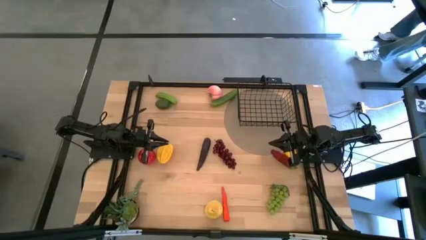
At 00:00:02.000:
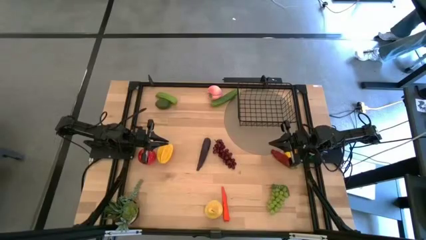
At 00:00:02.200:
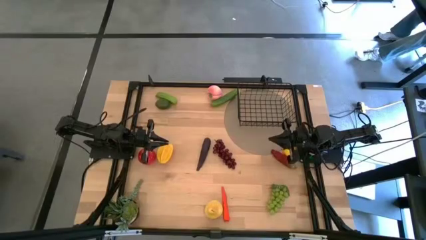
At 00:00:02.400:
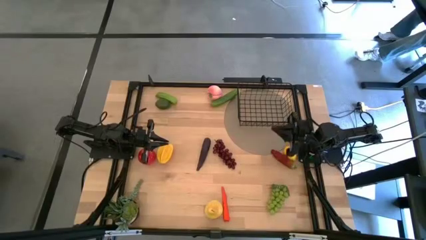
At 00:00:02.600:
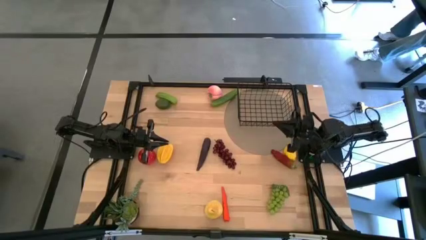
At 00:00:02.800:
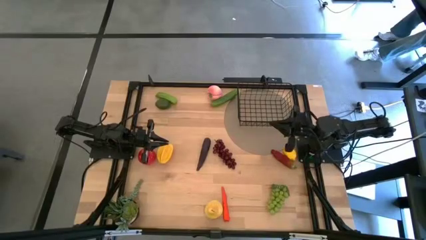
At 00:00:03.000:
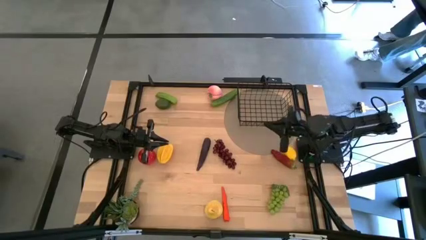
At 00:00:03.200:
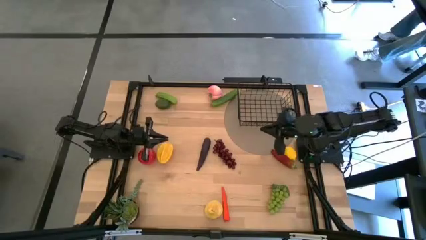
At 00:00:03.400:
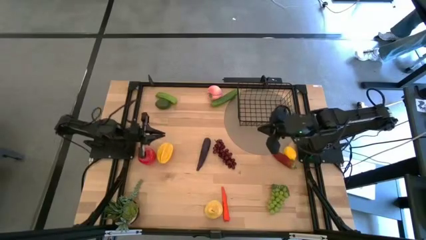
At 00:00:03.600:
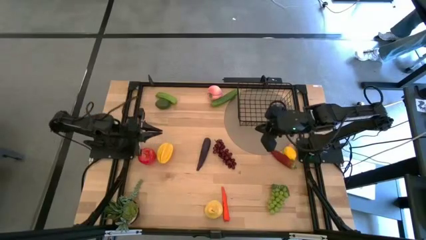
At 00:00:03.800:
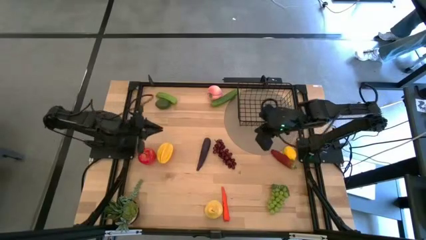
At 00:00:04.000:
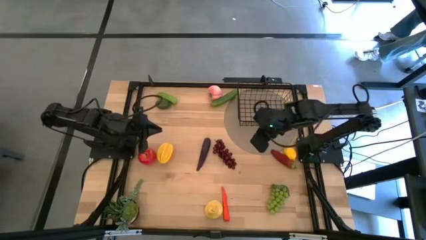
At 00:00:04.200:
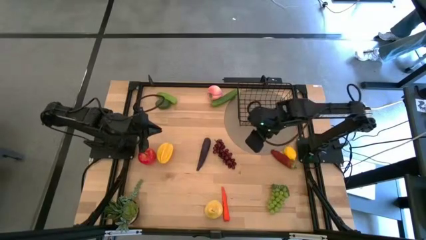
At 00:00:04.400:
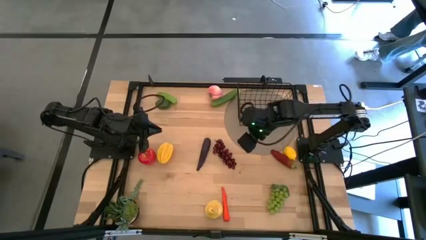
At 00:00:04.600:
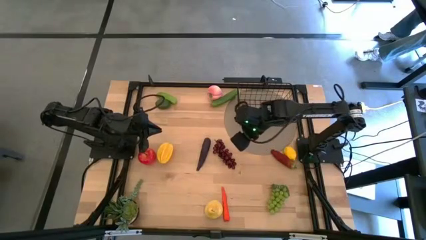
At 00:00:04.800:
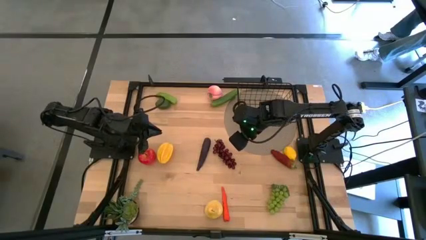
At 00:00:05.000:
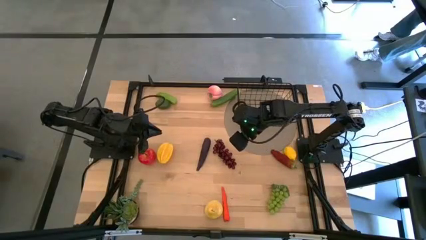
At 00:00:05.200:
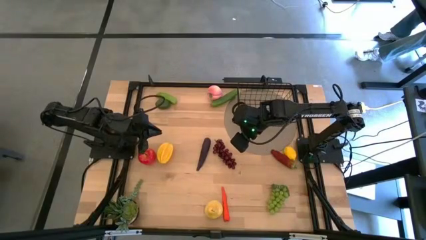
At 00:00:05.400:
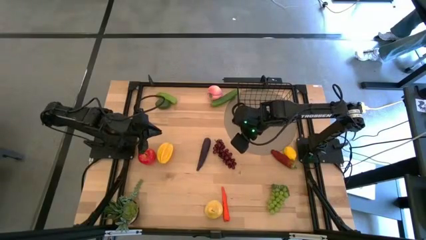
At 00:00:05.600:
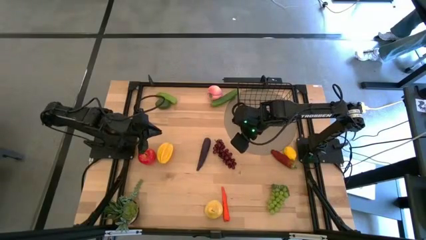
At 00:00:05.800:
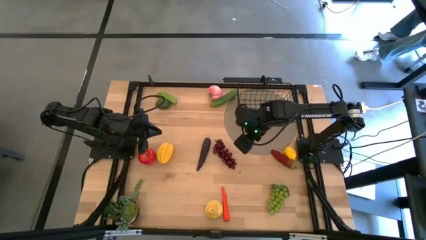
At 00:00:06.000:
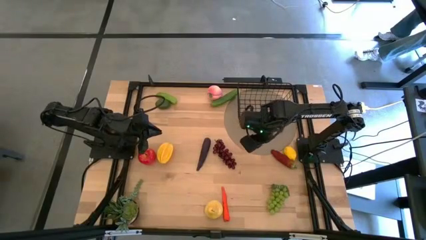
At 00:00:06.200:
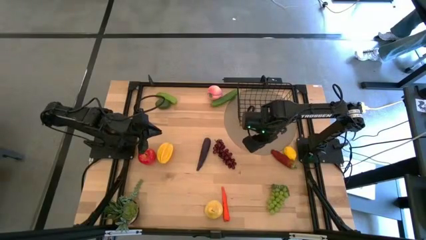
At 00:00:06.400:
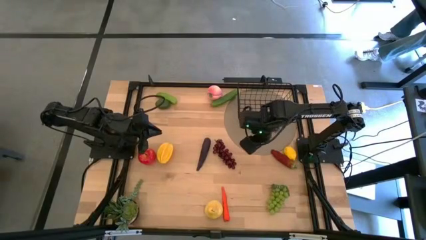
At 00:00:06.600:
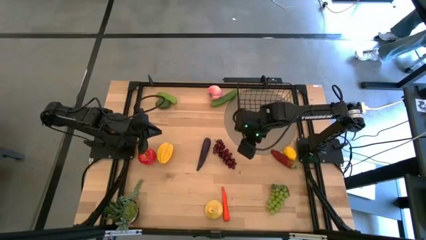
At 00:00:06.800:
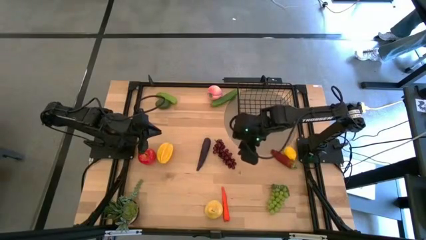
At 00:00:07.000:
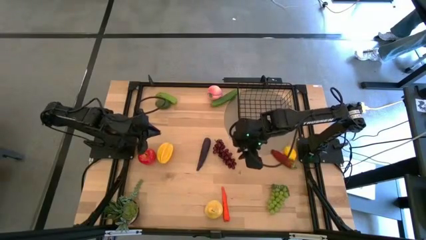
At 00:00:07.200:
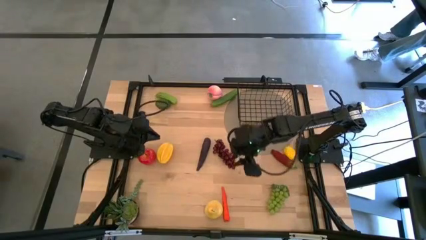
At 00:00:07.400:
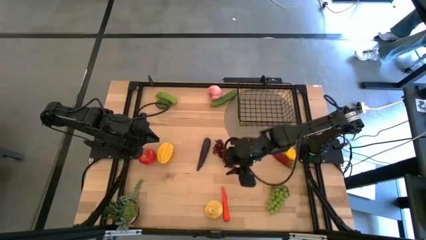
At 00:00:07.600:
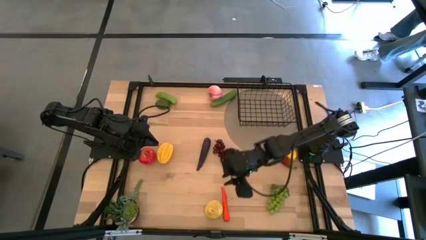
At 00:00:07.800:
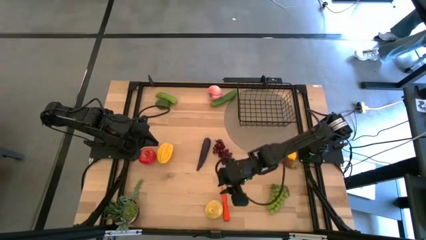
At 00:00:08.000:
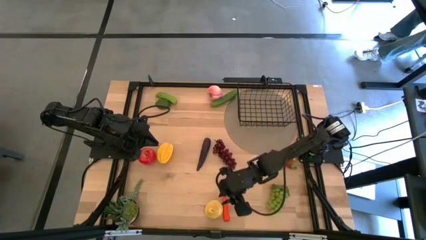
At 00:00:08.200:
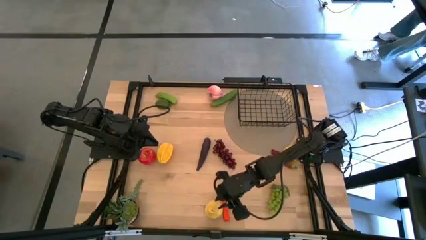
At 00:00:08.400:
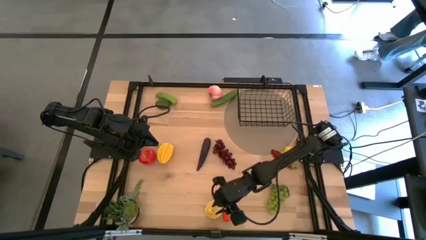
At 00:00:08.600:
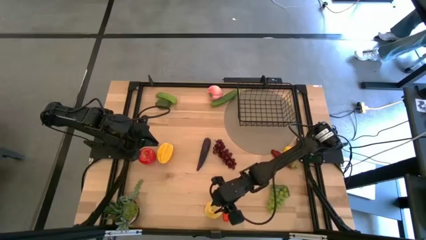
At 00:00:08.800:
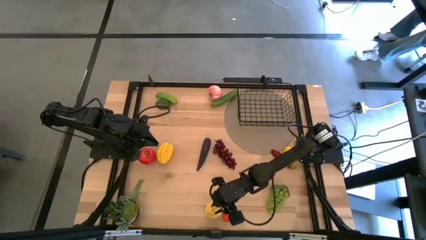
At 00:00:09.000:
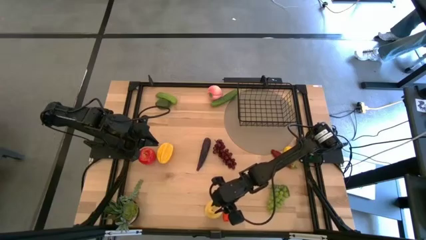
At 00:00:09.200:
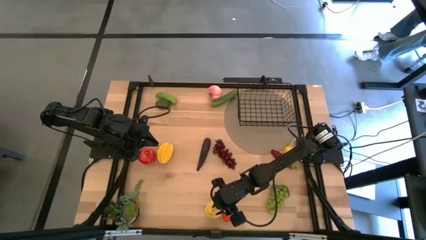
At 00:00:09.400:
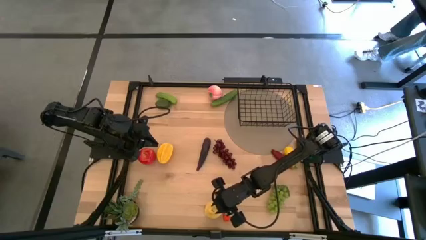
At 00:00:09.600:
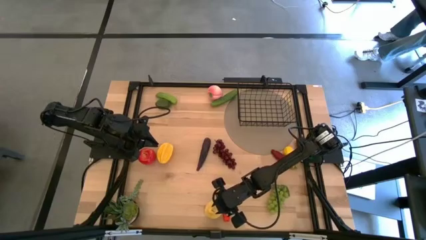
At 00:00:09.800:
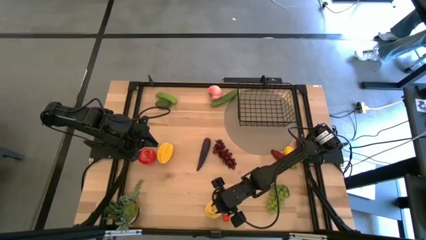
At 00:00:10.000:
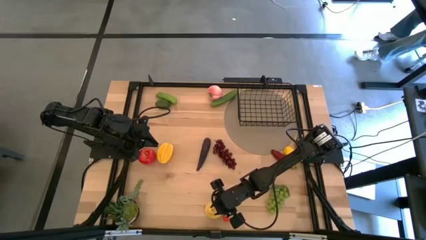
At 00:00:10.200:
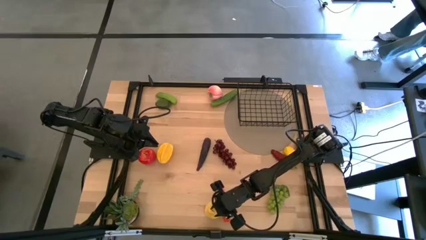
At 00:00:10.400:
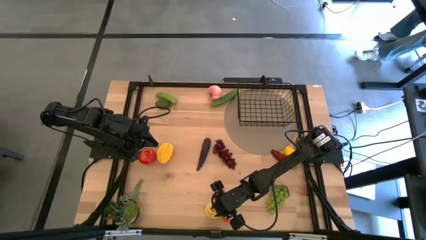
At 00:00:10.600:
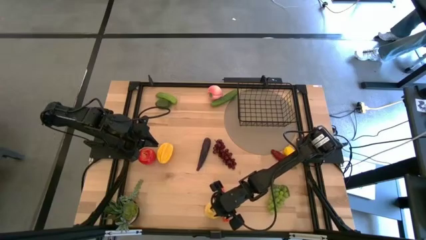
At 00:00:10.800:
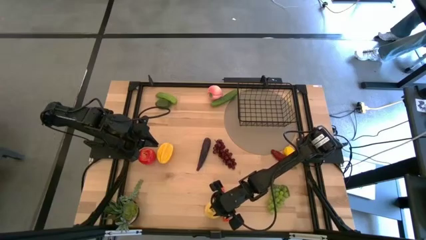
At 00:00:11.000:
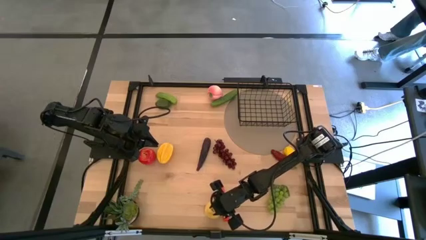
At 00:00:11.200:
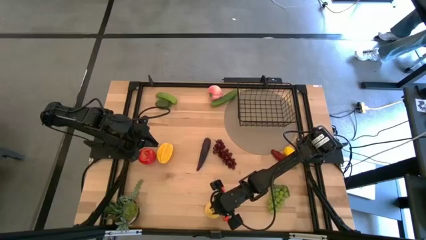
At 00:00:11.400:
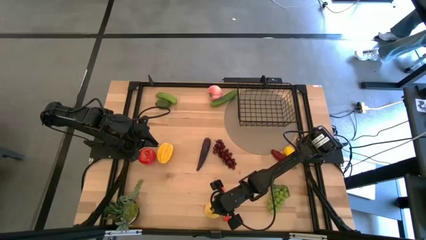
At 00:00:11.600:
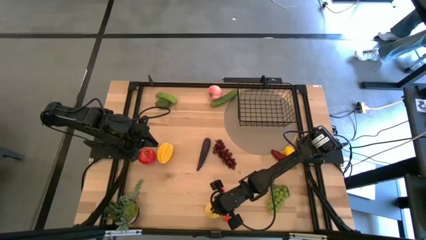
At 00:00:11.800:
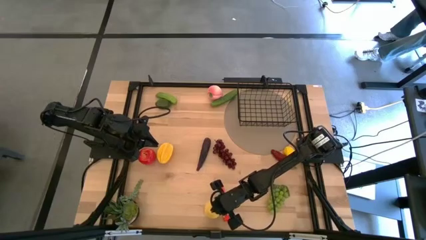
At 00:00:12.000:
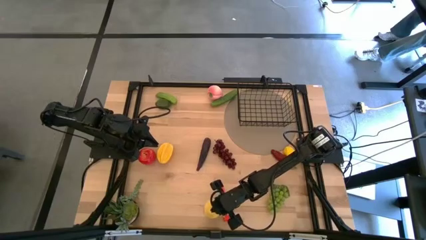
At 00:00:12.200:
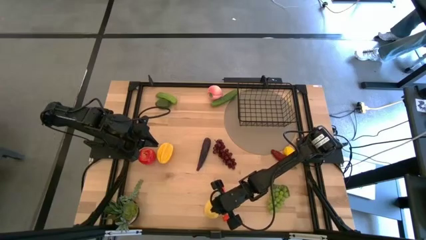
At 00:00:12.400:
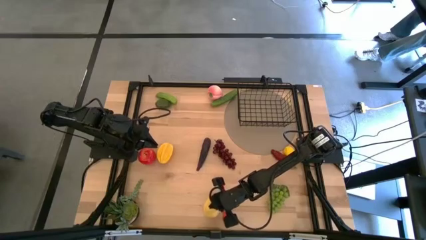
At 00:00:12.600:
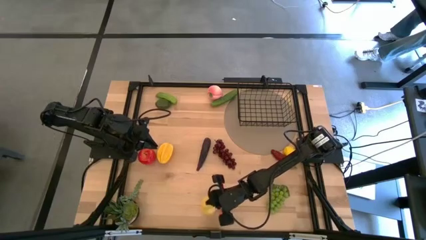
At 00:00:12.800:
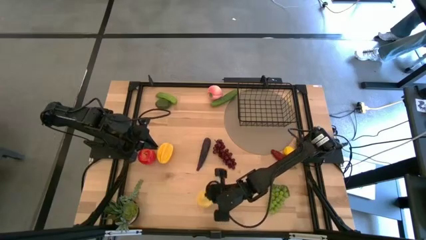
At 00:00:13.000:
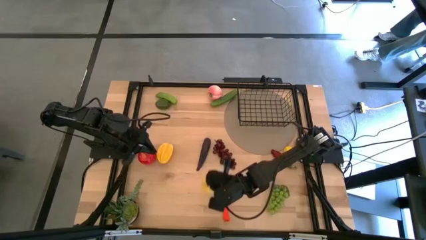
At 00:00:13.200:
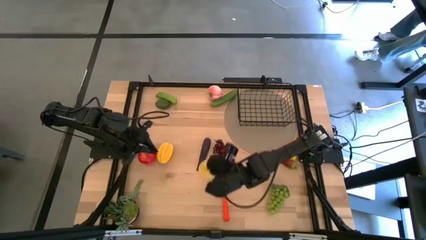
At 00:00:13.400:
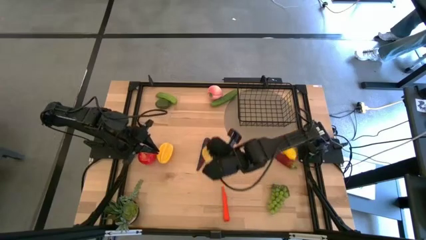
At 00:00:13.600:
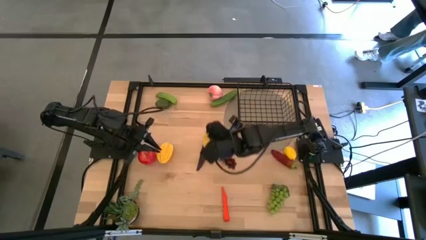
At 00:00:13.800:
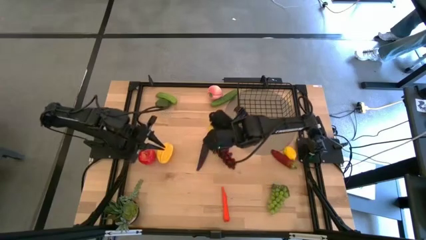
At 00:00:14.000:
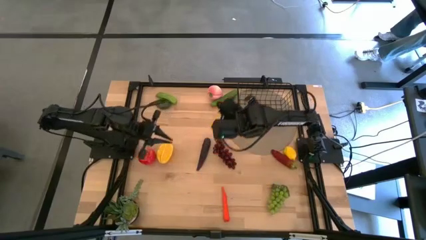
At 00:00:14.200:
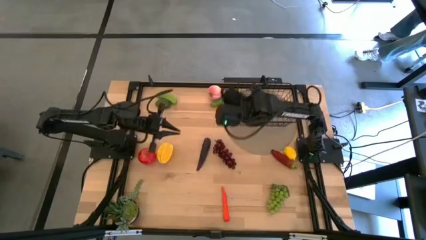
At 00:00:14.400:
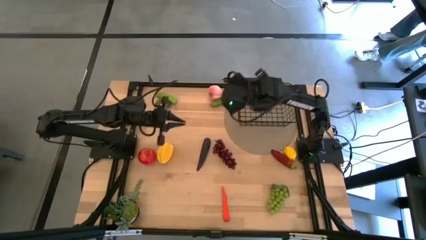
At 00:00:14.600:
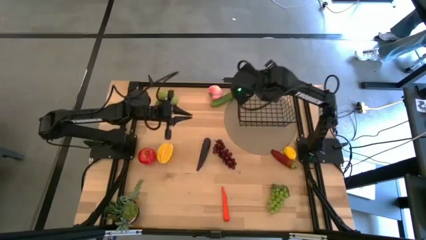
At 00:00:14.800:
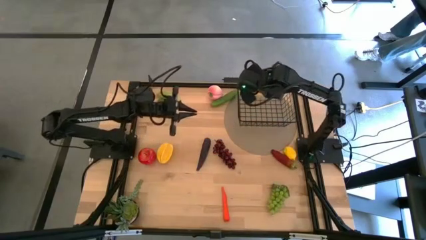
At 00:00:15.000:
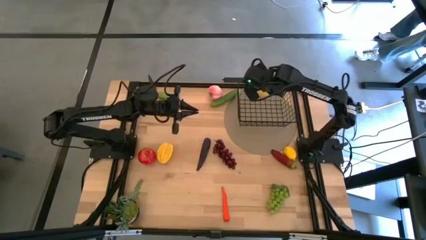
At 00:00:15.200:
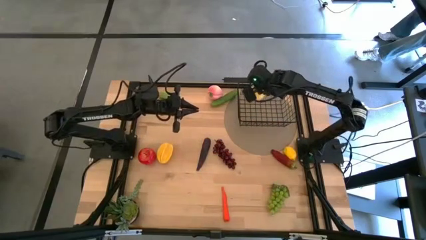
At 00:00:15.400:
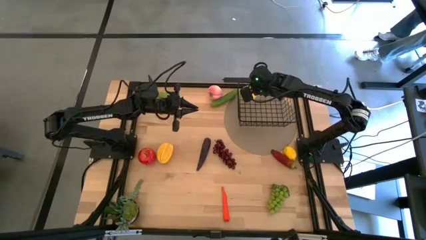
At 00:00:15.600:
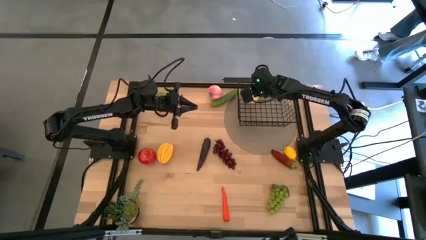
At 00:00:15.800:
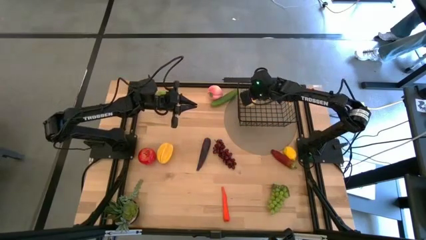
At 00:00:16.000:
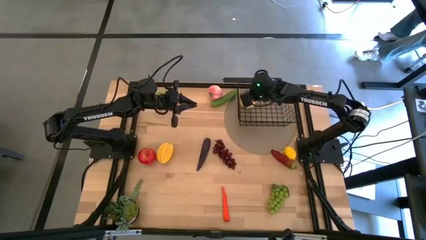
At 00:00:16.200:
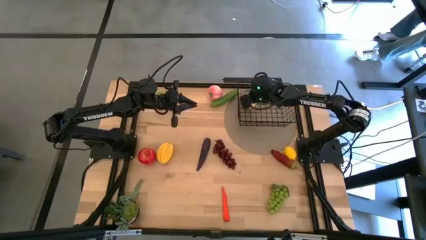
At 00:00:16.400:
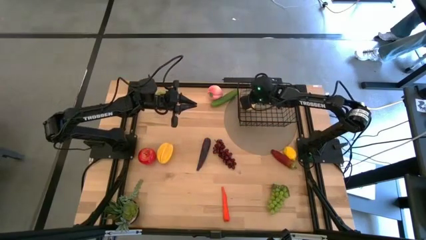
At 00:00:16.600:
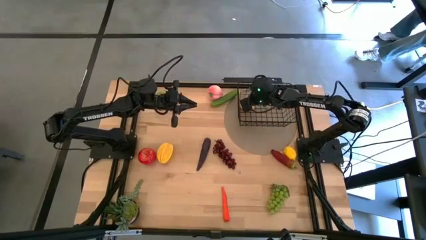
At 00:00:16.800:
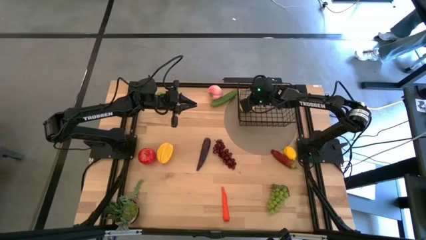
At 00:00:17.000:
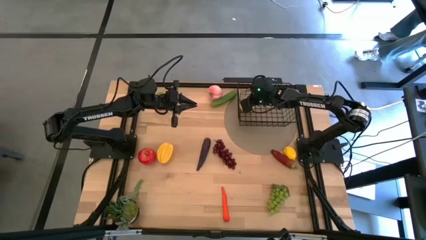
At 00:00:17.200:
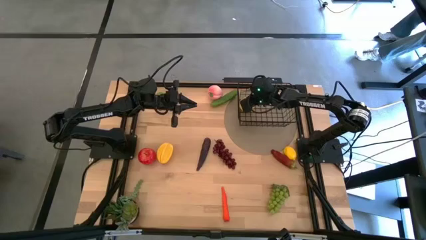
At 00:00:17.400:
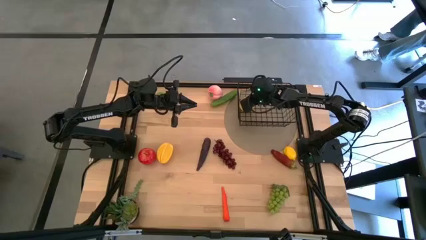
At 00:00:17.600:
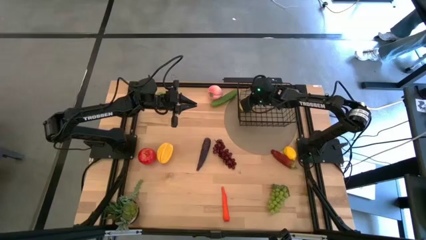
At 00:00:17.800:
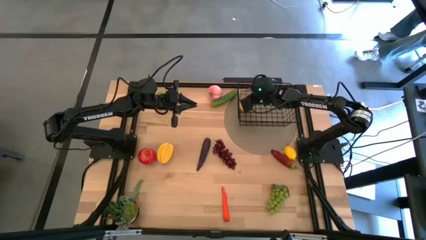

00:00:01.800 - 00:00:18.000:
Task: Build produce basket
Put the yellow pear into the black wire basket
